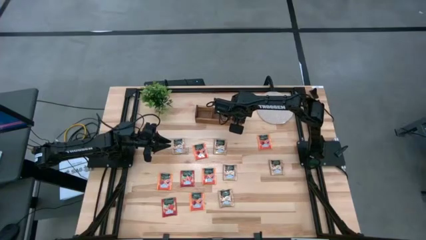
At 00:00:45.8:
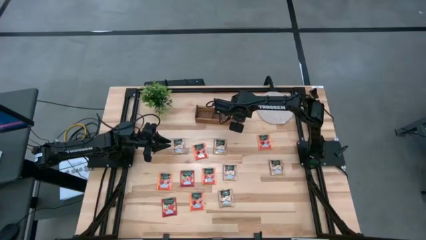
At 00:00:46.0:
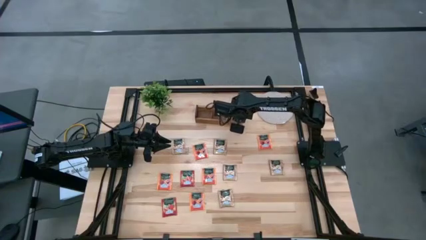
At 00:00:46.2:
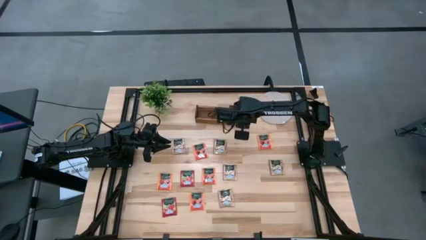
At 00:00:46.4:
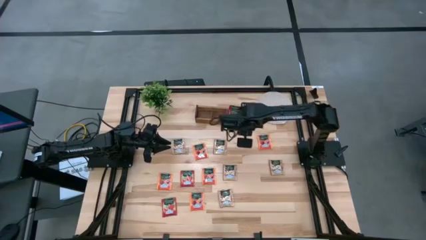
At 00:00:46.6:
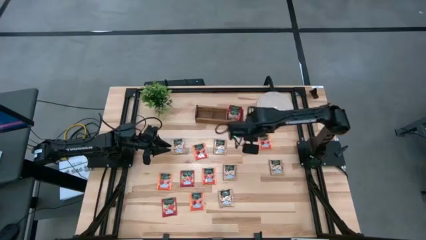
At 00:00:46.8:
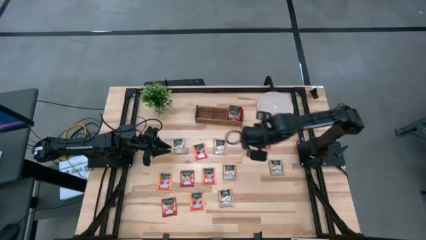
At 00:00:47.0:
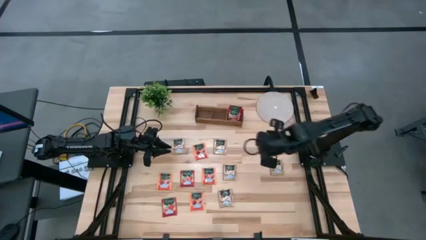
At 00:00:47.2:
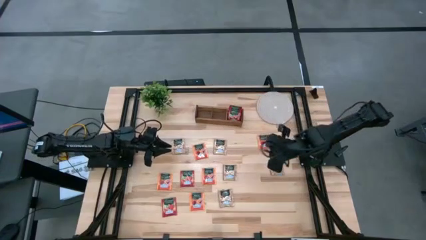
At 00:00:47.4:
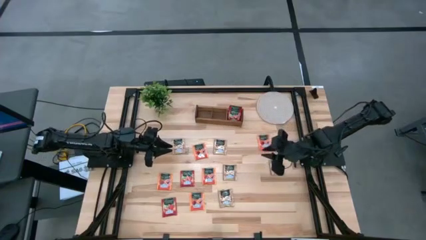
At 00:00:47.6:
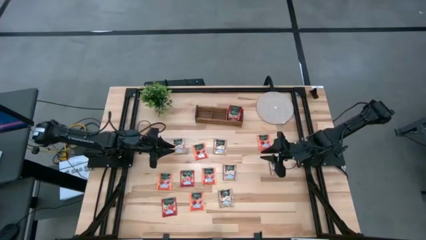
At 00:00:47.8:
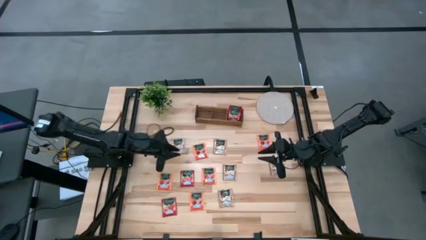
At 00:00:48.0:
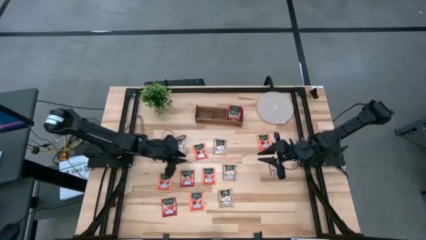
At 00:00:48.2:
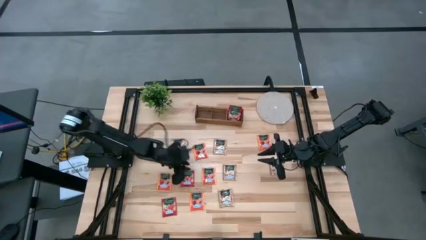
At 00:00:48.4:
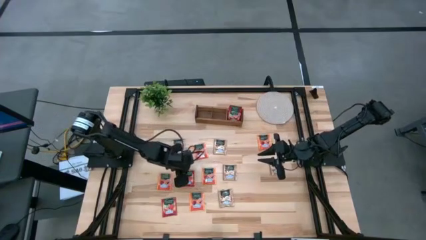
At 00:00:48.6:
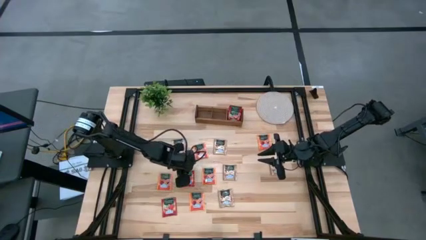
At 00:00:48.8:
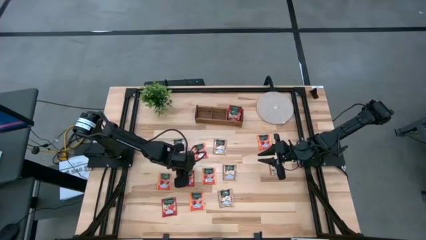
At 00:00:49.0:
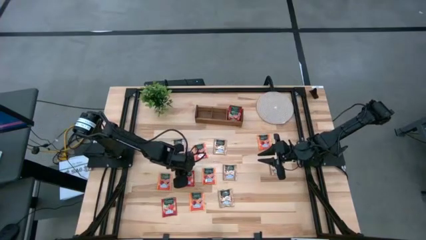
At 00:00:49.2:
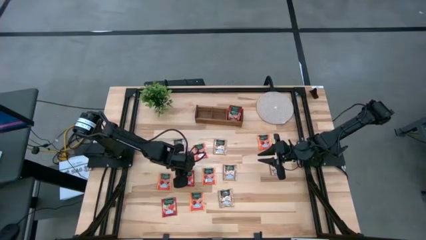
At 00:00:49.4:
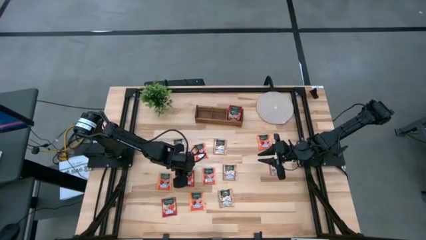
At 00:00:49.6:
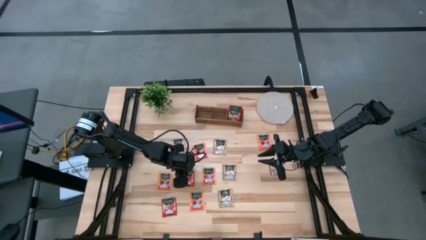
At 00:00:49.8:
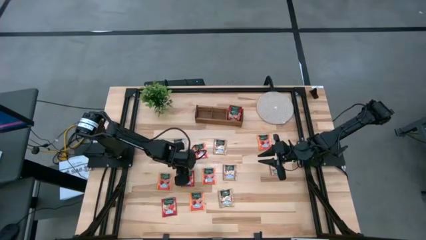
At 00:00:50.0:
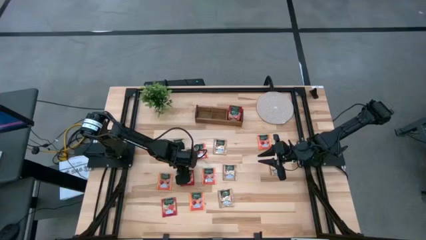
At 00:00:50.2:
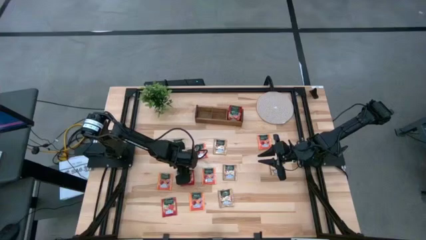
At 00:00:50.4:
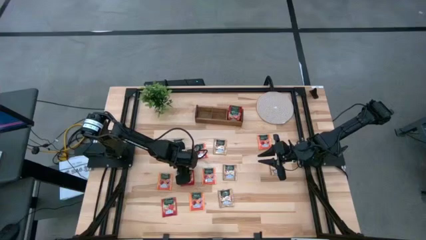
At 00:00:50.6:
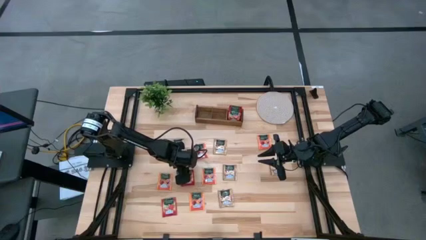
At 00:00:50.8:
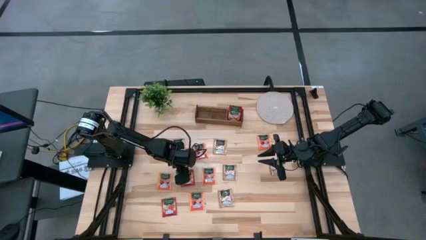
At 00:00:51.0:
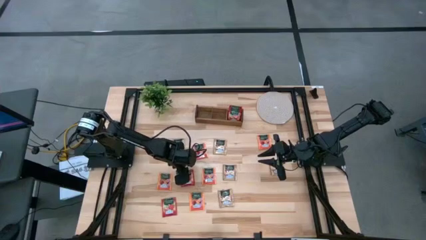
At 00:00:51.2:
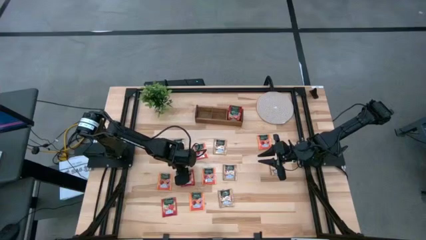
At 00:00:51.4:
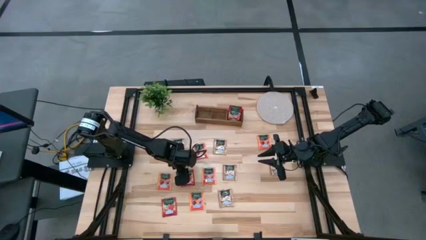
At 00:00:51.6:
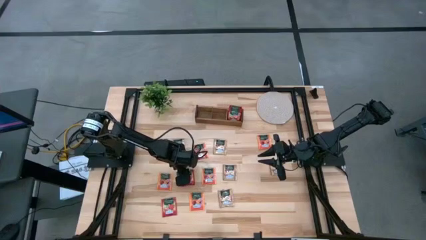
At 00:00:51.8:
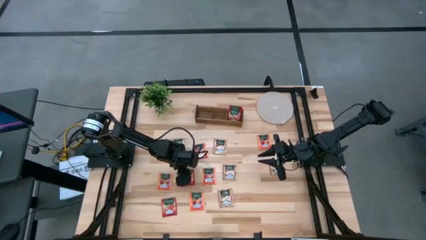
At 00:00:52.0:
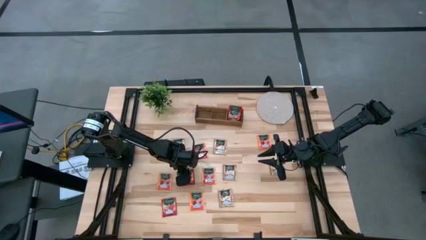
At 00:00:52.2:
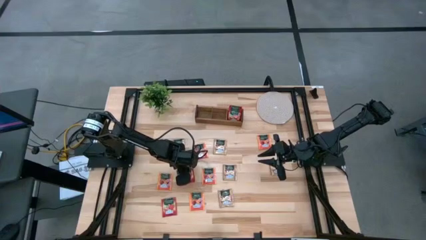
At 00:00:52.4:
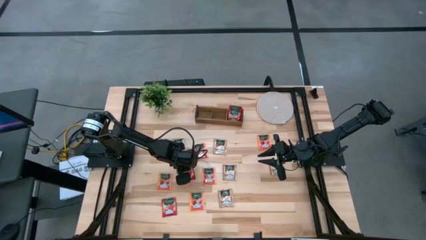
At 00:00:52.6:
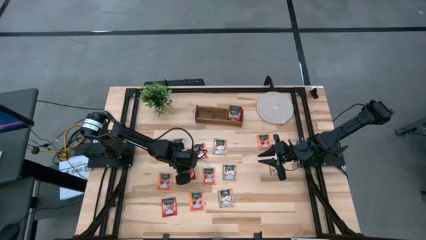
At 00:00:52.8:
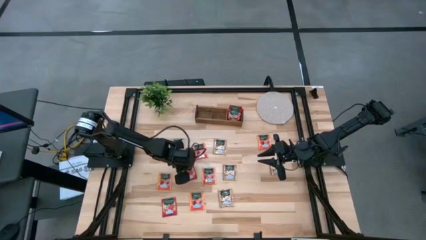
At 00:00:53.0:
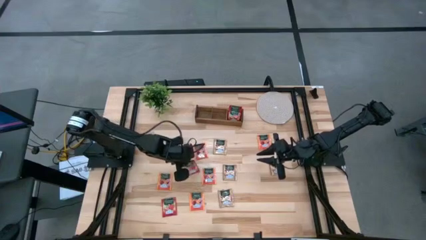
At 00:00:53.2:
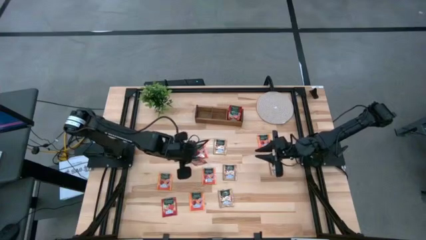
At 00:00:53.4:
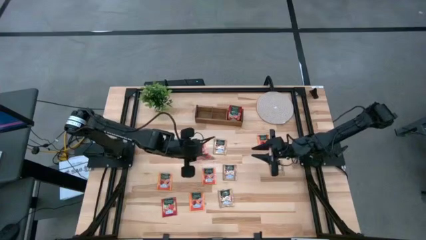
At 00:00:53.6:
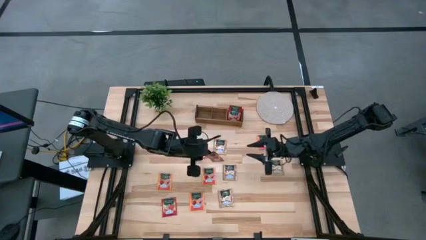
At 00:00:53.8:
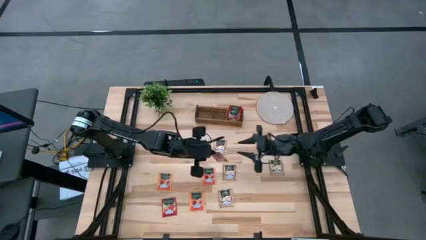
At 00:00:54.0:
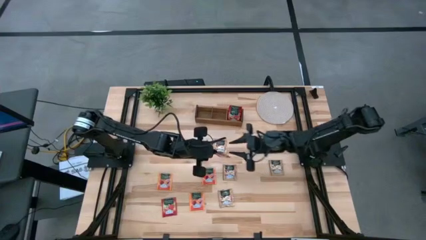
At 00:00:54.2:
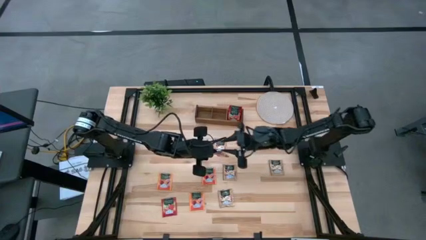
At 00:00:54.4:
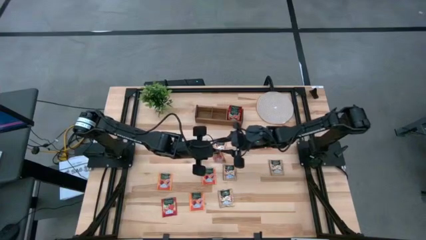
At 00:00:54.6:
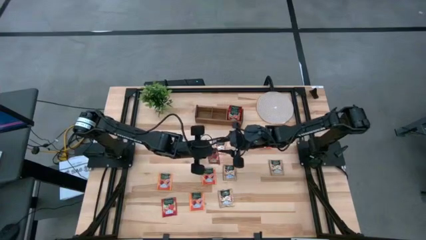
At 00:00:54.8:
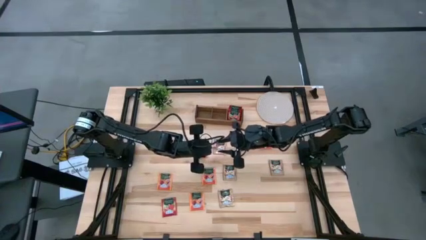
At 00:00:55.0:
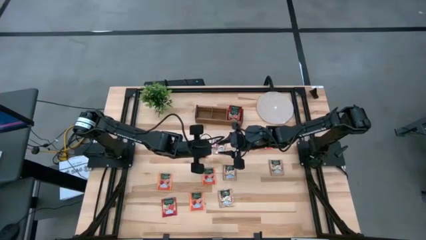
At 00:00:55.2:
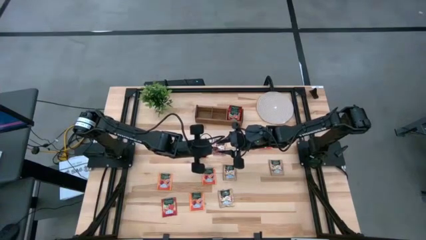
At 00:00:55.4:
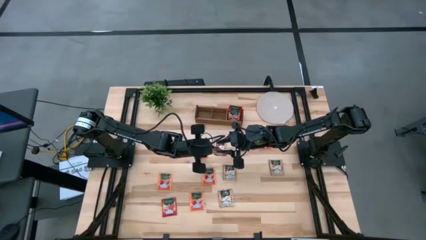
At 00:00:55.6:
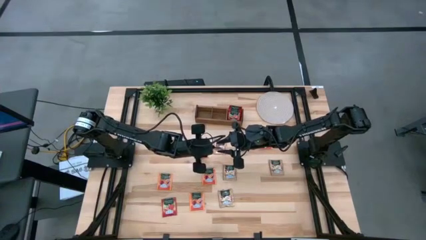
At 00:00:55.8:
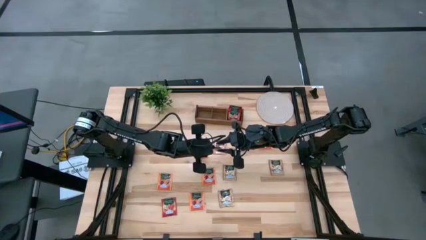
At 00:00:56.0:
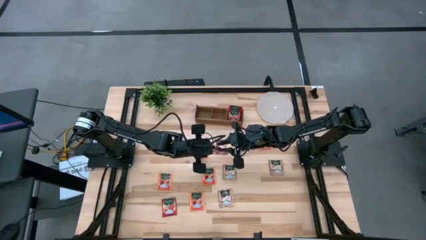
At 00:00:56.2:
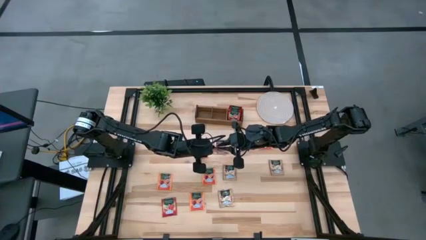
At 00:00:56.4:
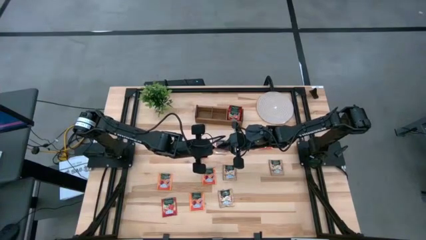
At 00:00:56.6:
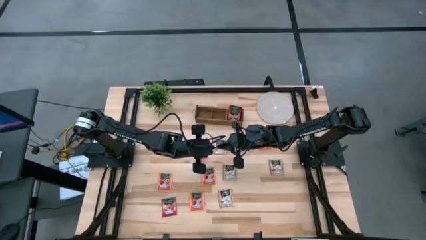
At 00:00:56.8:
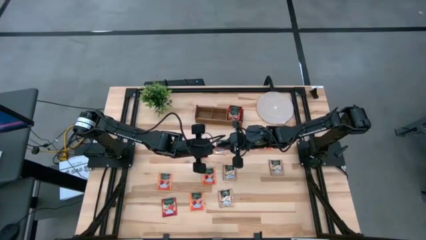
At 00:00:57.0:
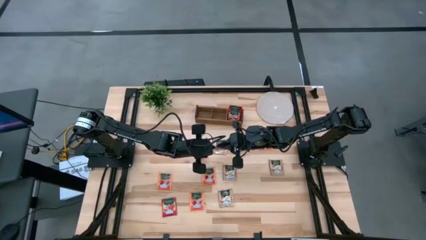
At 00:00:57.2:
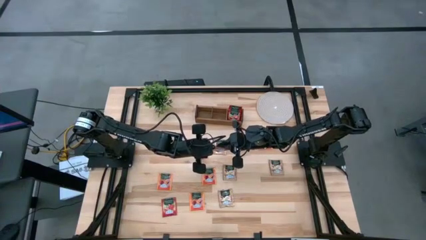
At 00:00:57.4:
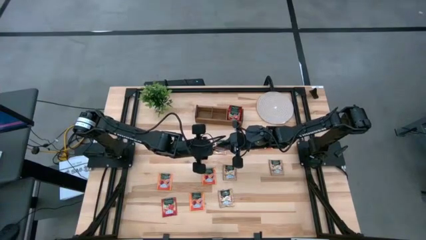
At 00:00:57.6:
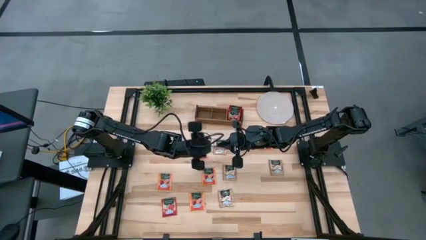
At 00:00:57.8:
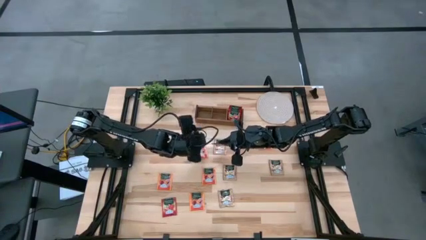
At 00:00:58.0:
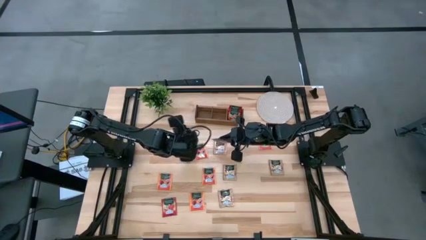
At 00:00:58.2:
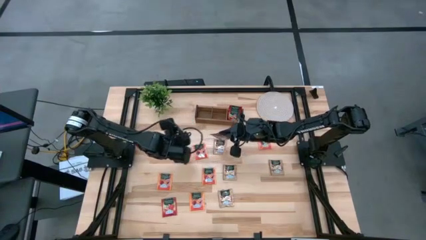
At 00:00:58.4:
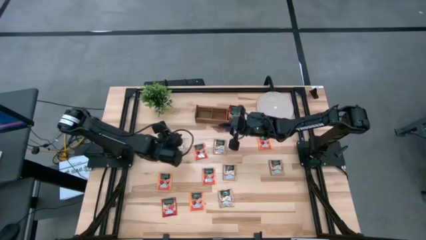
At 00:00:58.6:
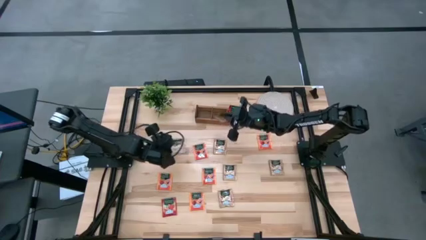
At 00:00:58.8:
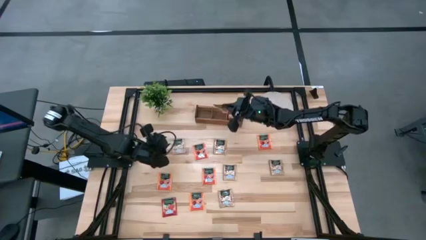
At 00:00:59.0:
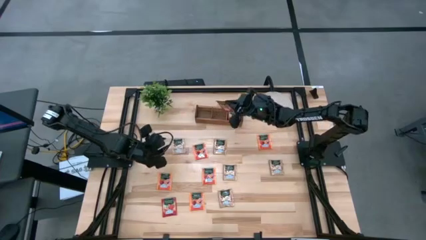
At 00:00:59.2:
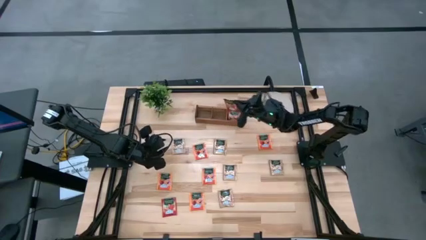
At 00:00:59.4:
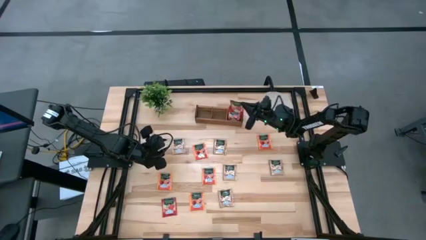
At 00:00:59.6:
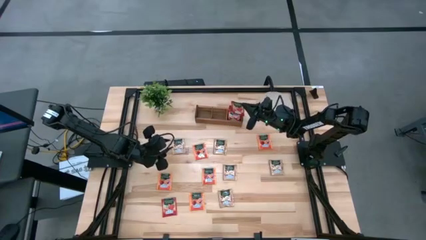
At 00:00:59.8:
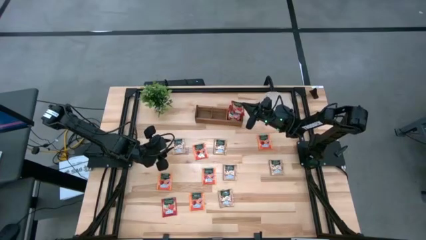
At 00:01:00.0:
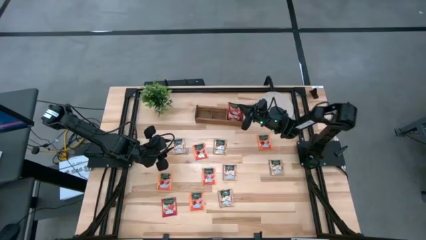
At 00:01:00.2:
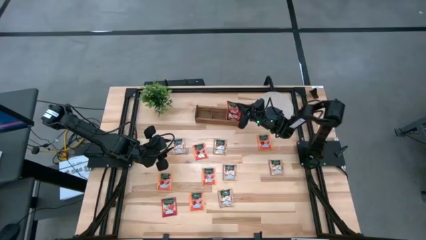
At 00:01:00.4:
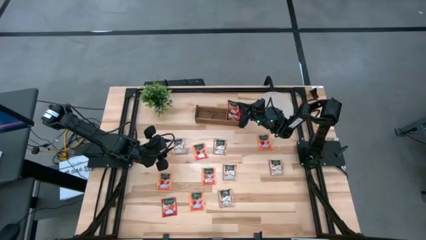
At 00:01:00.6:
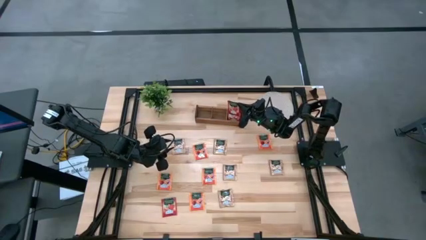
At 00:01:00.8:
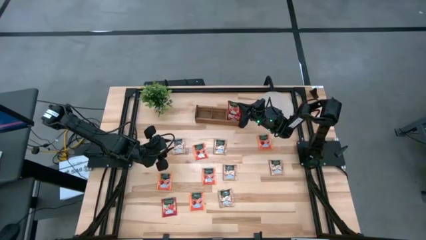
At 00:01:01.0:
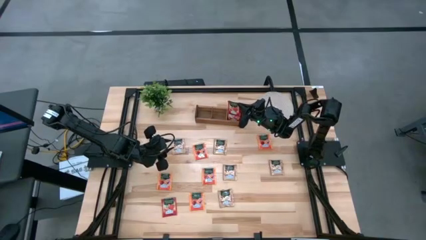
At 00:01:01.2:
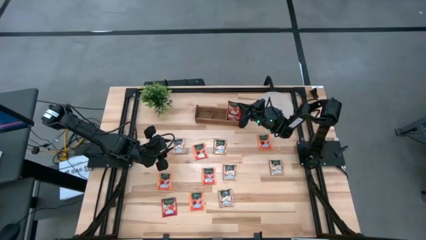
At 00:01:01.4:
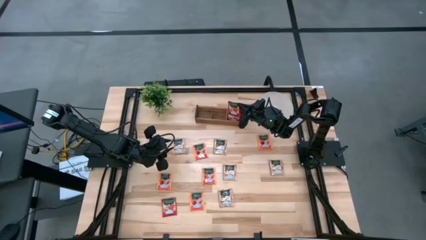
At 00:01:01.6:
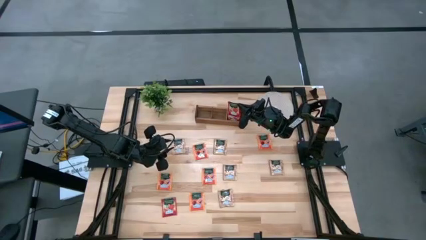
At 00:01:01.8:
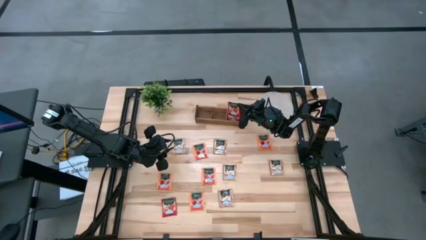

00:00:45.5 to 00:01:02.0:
Task: Pick & Place Tea
Put the red tea bag into the right section of the wooden organizer
